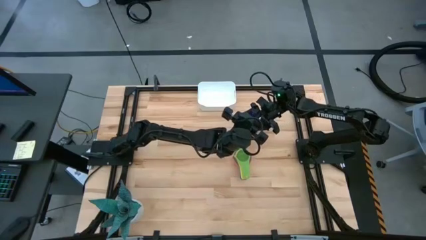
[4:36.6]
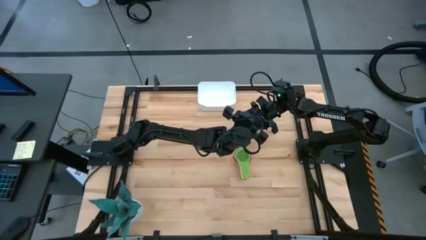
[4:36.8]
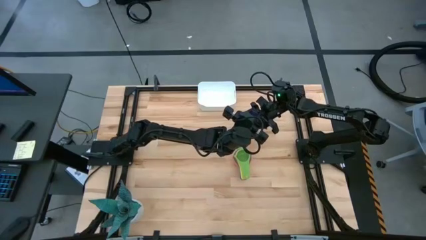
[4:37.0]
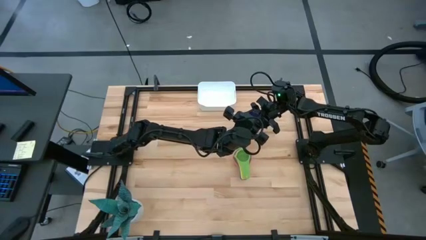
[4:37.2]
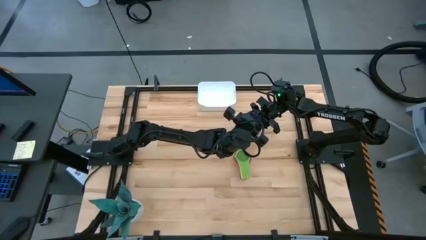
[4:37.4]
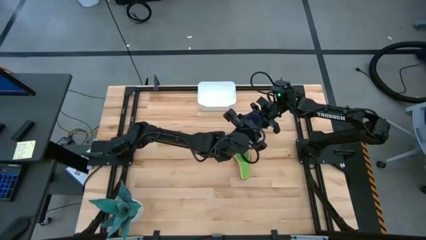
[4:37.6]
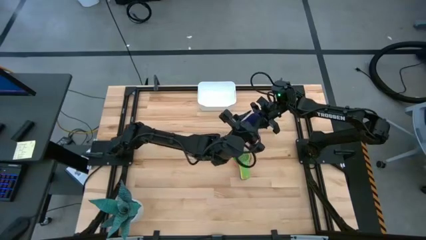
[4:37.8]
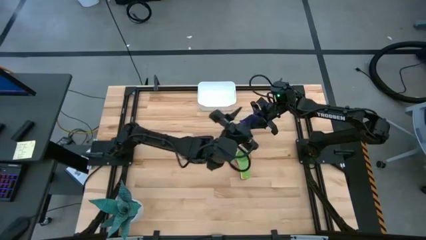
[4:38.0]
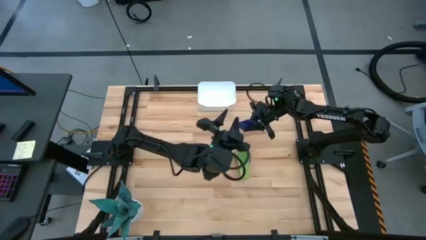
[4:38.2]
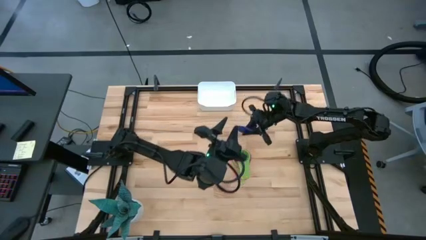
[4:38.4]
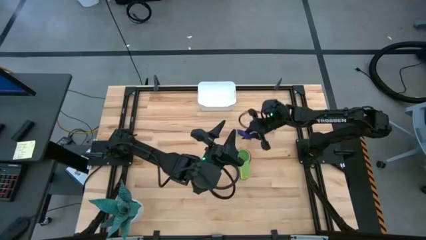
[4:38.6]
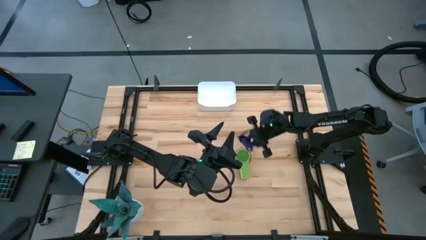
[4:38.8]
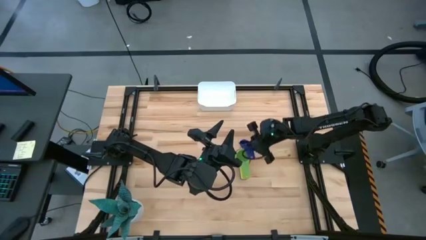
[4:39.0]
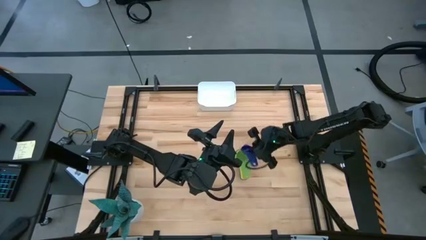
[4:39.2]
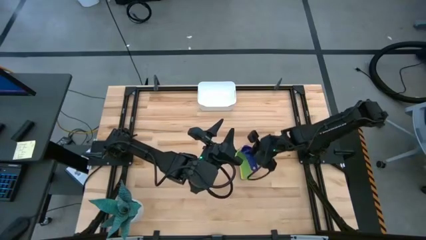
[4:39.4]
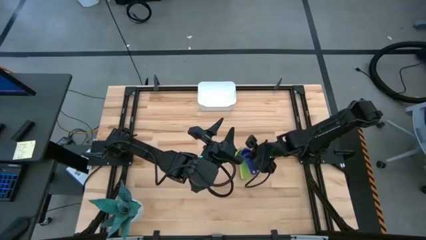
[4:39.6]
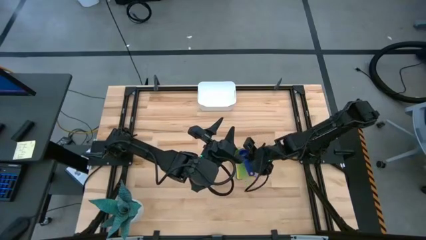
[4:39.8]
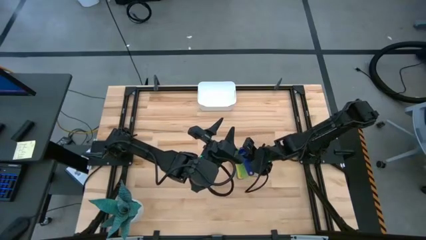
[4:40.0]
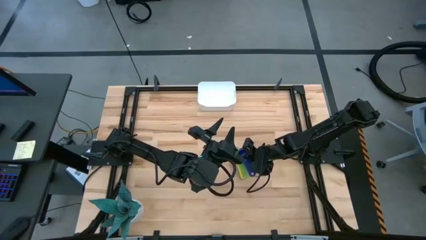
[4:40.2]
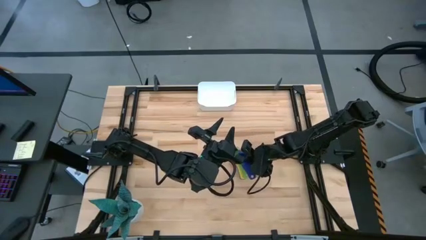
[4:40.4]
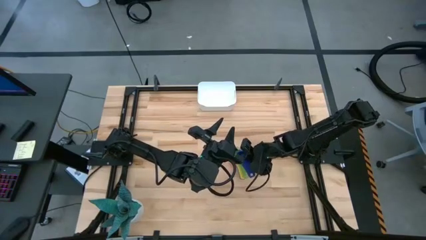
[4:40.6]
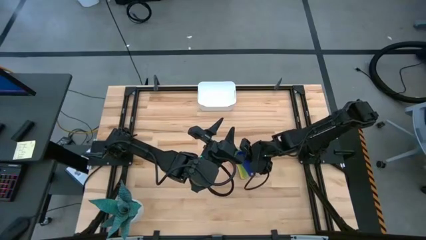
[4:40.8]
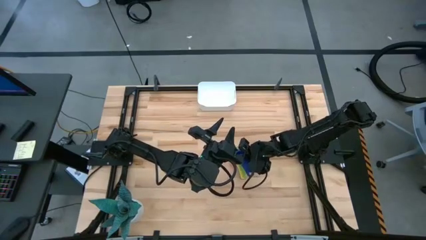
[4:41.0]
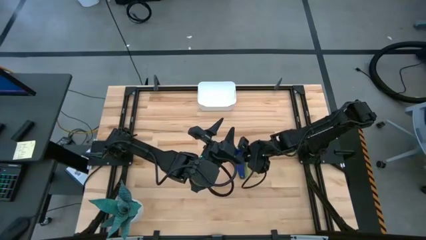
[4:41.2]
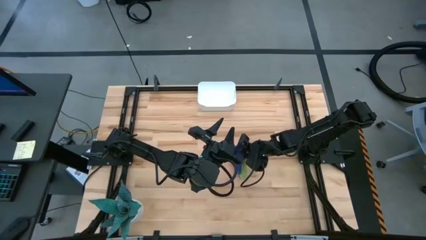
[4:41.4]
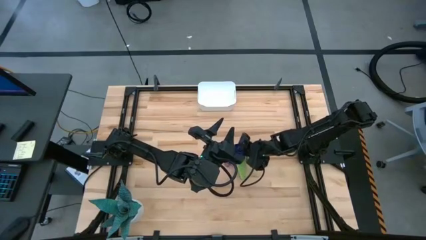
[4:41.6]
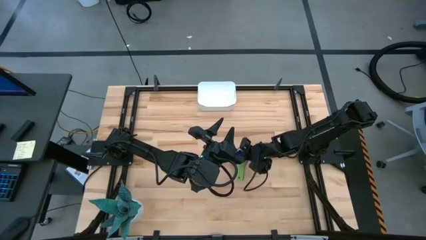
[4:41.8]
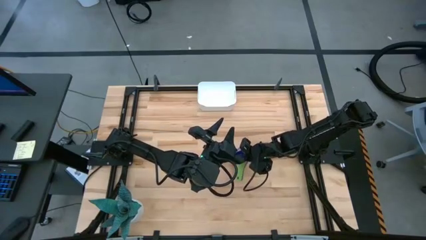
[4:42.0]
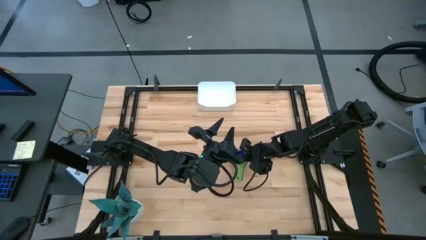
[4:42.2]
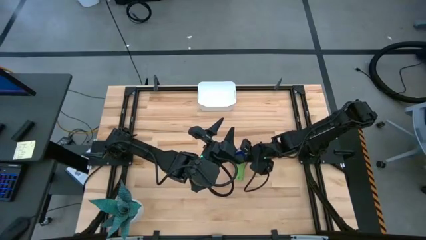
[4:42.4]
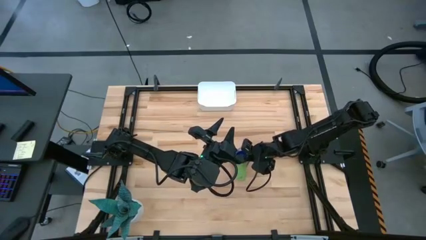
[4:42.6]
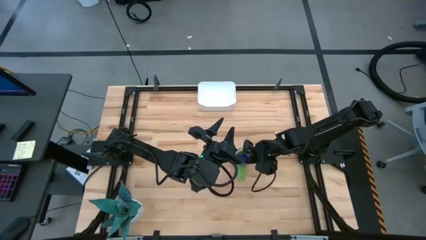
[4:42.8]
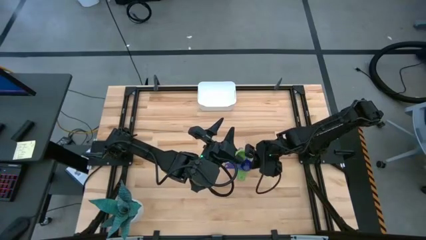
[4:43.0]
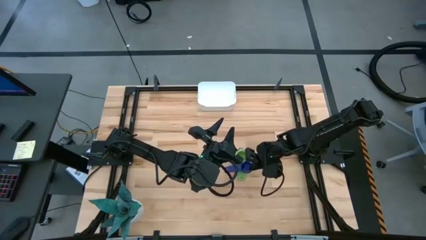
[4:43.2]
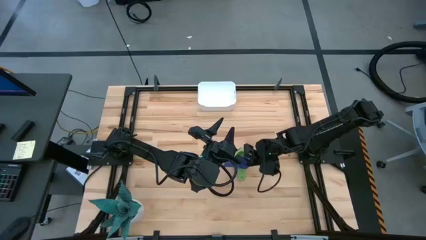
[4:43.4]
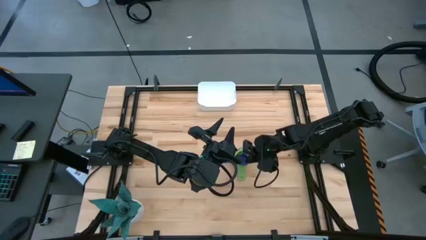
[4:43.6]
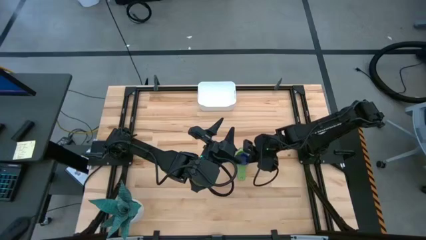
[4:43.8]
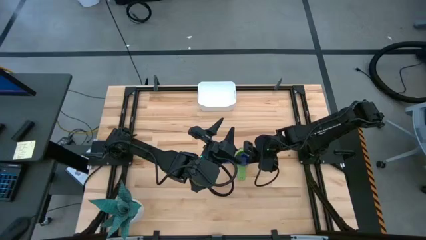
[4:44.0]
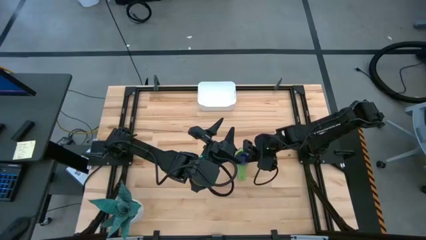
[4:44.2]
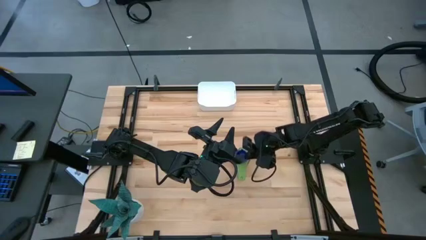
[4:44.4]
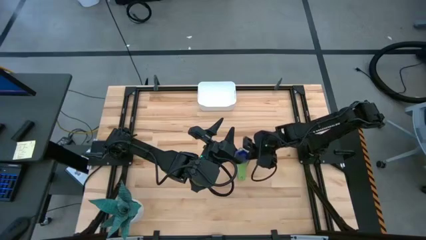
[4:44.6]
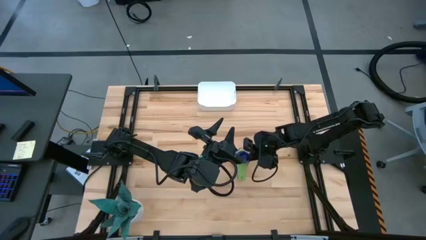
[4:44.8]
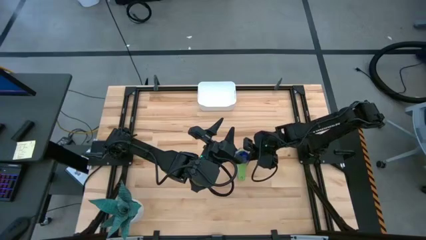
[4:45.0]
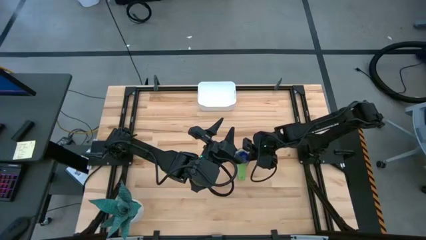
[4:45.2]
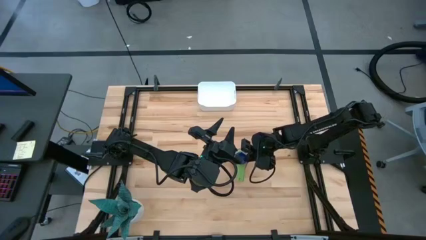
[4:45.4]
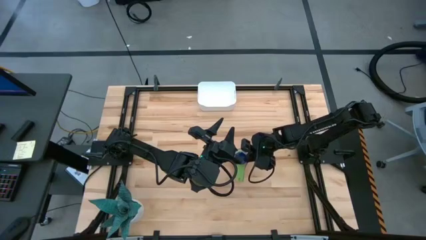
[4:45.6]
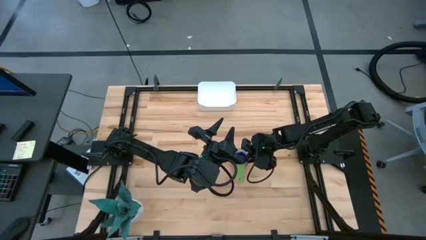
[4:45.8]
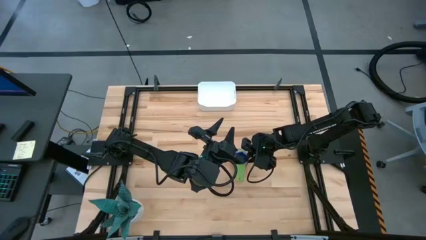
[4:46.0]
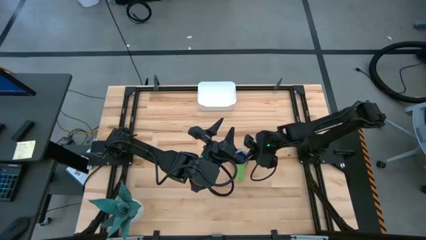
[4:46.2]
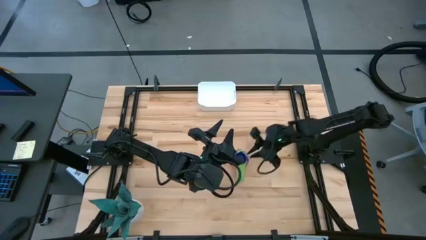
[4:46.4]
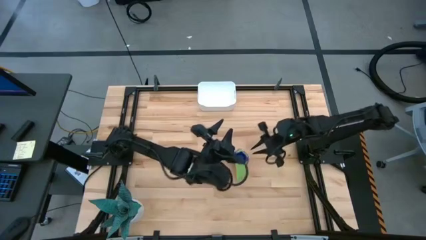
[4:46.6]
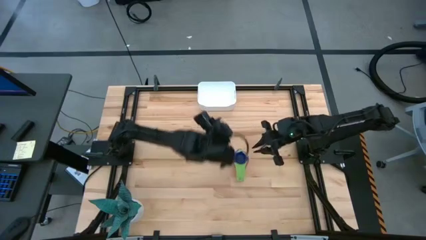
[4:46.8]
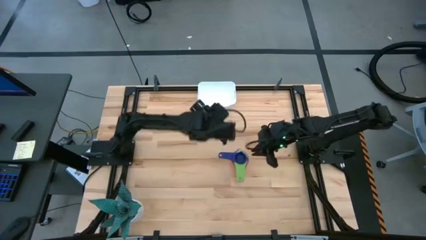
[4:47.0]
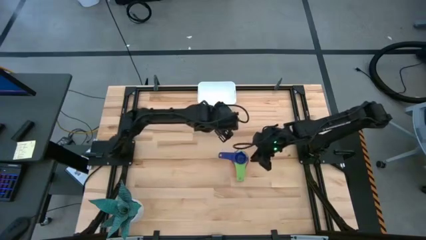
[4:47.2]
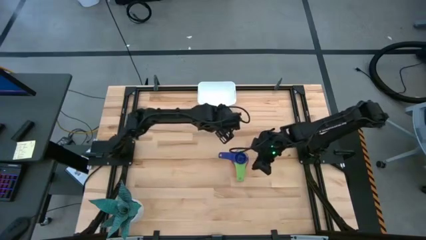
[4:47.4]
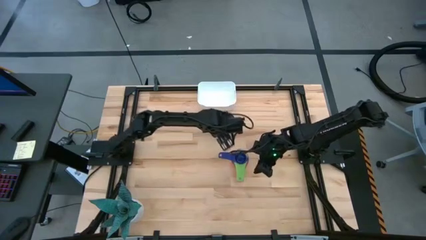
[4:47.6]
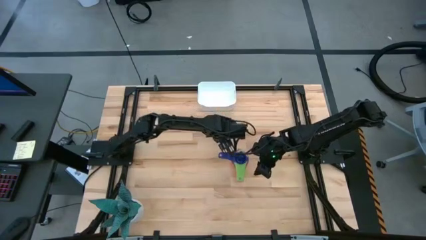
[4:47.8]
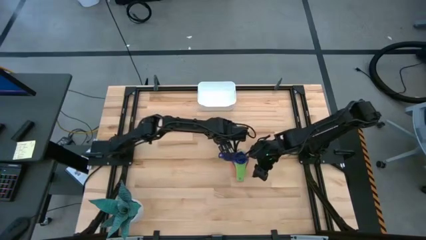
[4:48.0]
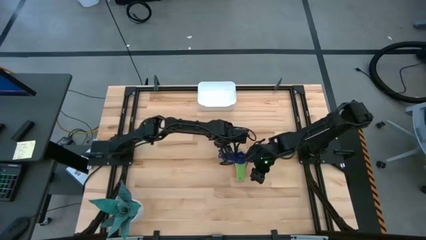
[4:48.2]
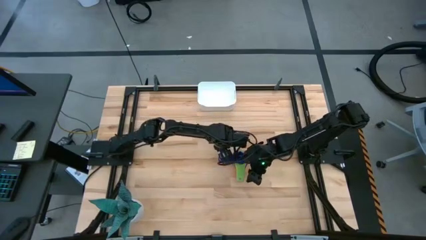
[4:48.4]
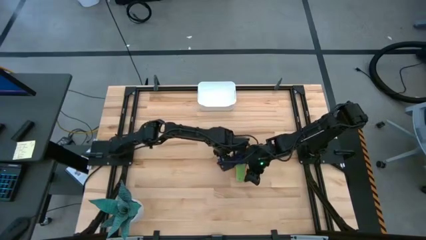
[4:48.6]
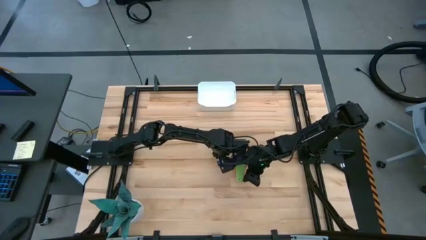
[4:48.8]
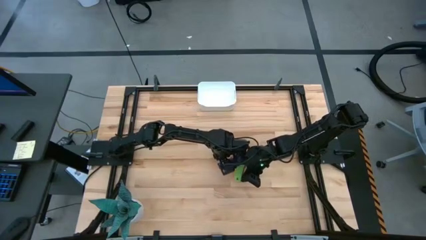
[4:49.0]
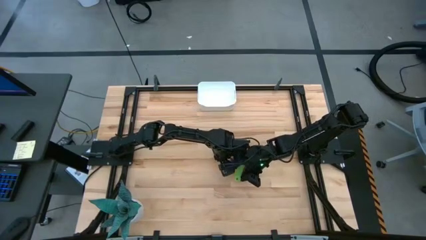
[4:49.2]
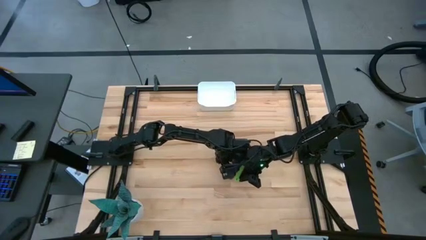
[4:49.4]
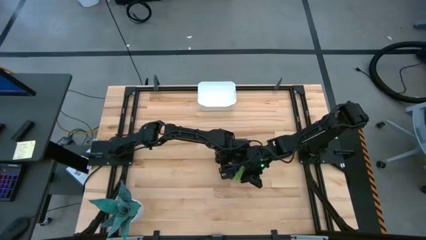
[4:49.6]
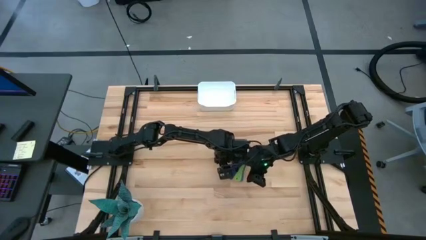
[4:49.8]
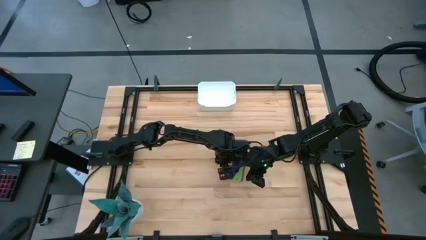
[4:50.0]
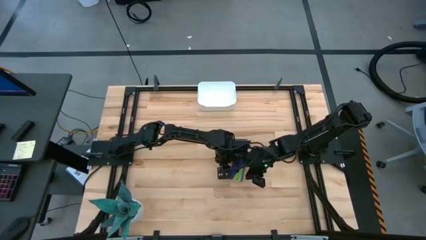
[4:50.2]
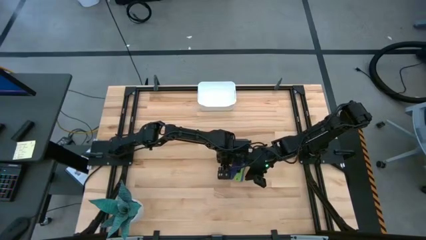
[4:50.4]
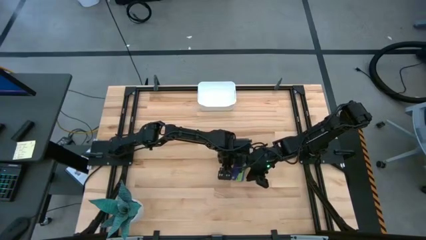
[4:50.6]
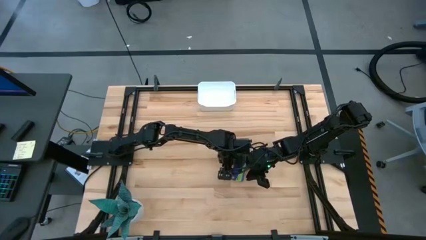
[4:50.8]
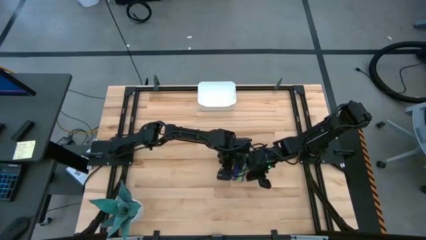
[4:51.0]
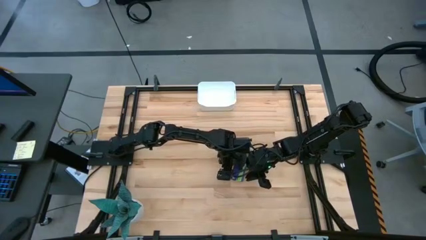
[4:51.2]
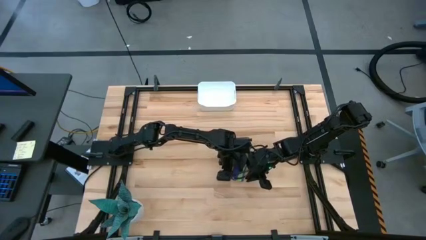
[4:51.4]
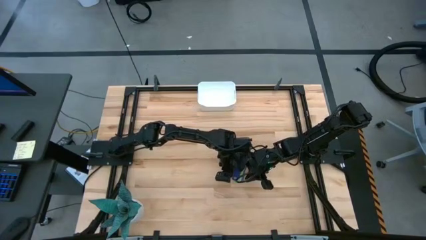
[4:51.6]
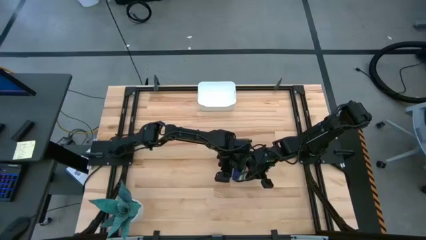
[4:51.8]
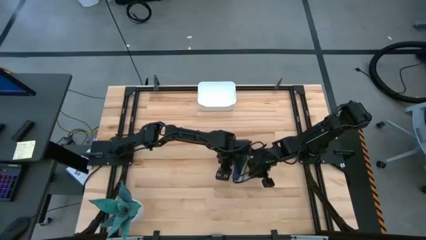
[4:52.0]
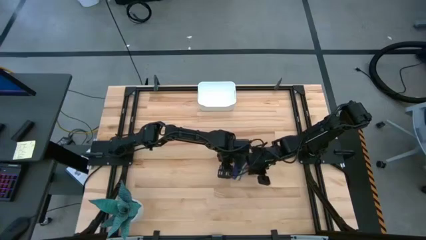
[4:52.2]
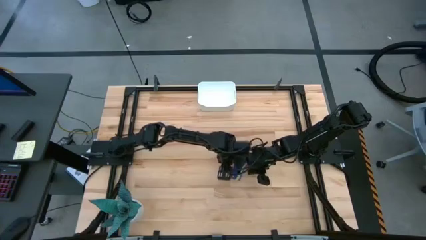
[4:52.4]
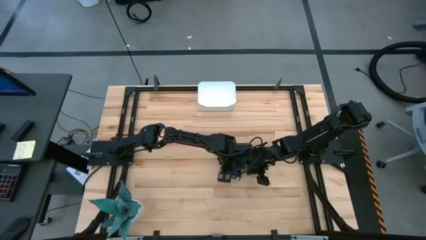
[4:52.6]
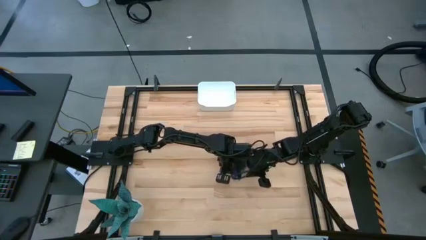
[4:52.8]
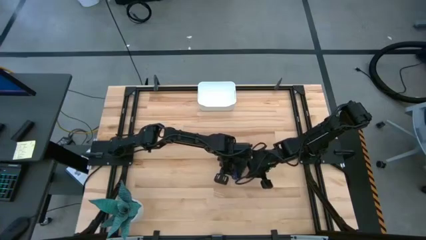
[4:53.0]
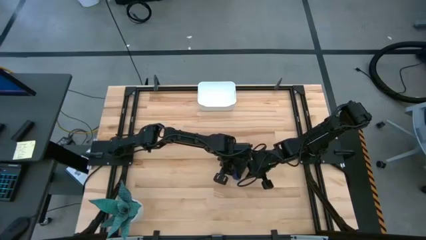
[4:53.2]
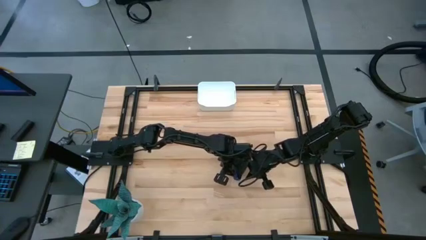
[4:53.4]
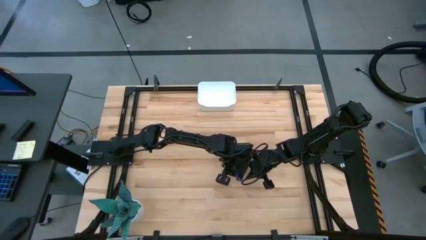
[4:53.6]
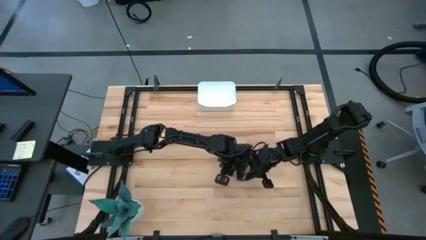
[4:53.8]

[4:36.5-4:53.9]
Task: Nest measuring cups in basket
Stack the dark blue measuring cup on top of the green measuring cup
